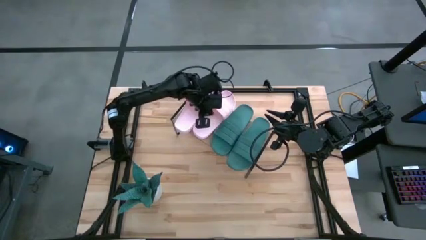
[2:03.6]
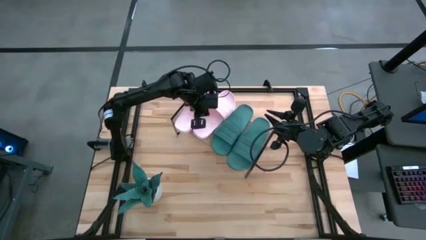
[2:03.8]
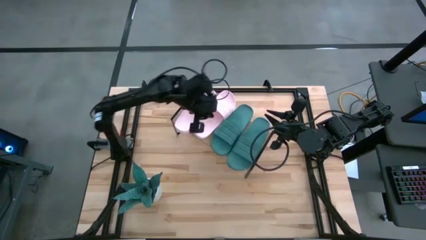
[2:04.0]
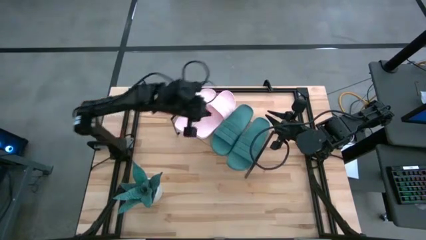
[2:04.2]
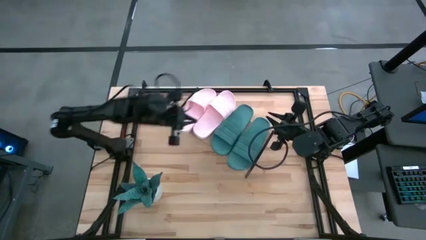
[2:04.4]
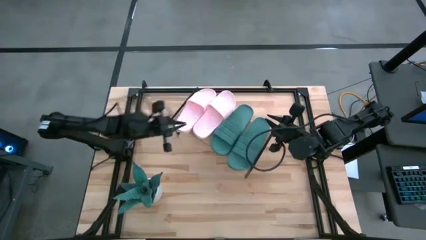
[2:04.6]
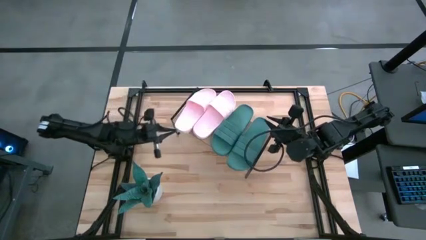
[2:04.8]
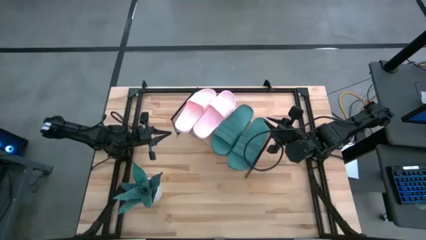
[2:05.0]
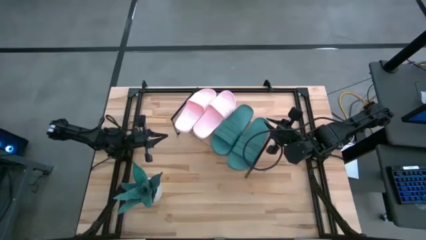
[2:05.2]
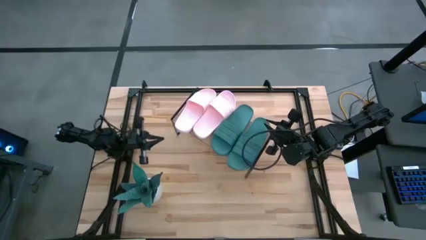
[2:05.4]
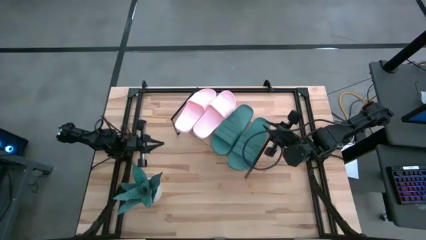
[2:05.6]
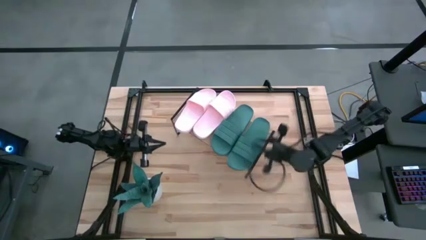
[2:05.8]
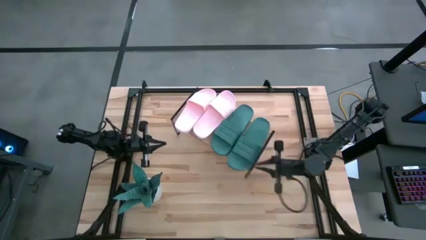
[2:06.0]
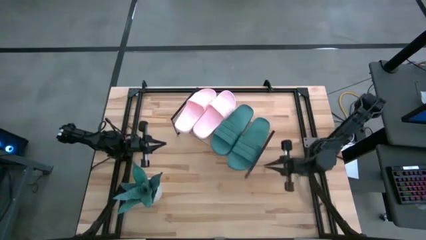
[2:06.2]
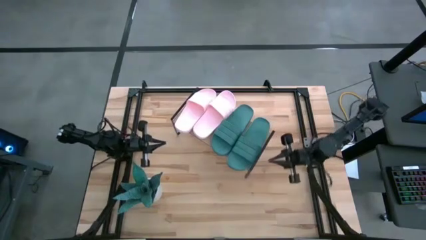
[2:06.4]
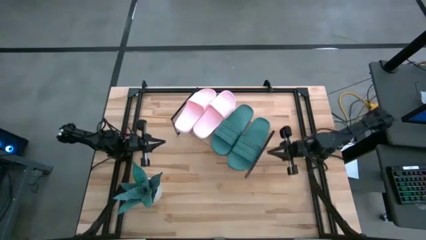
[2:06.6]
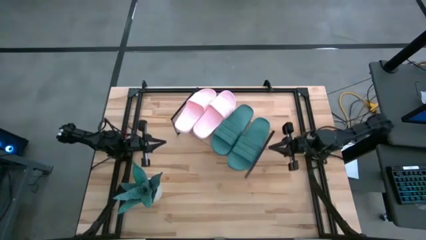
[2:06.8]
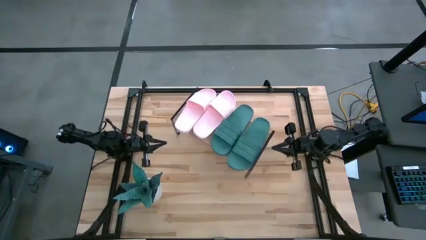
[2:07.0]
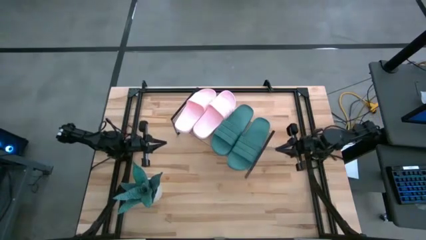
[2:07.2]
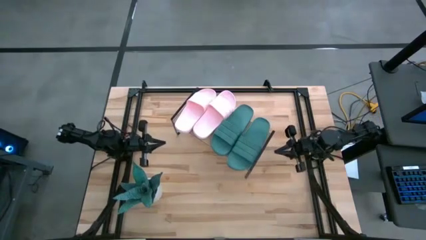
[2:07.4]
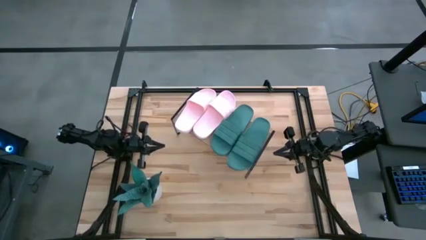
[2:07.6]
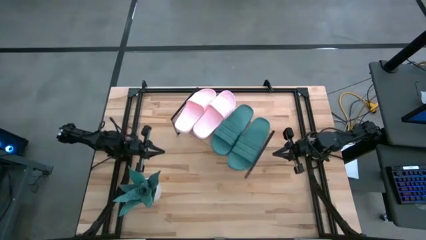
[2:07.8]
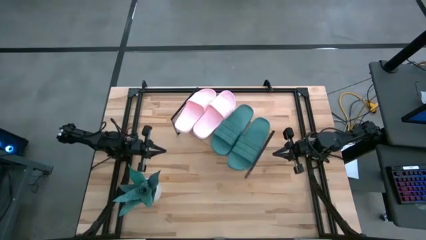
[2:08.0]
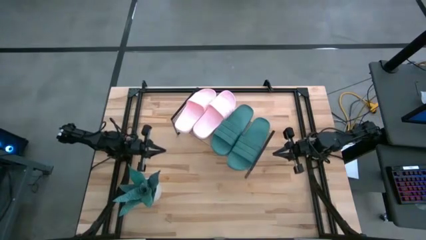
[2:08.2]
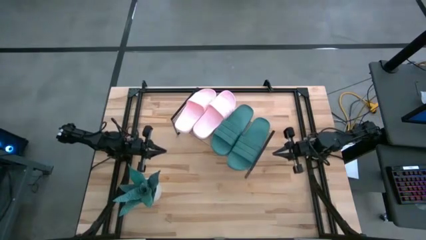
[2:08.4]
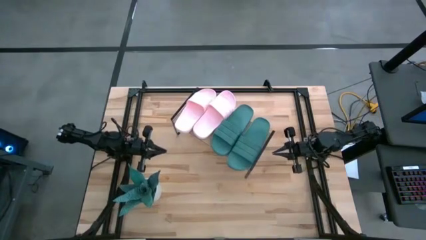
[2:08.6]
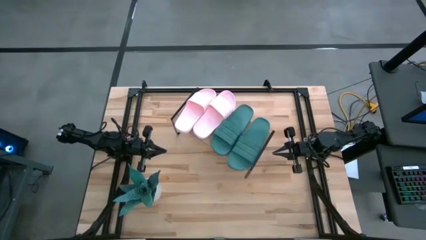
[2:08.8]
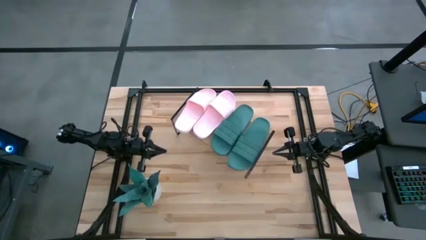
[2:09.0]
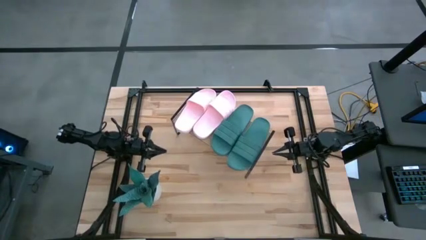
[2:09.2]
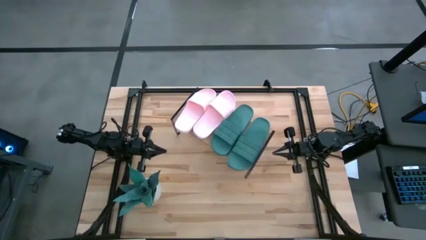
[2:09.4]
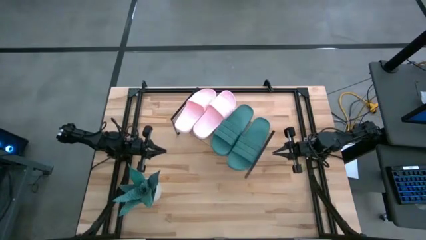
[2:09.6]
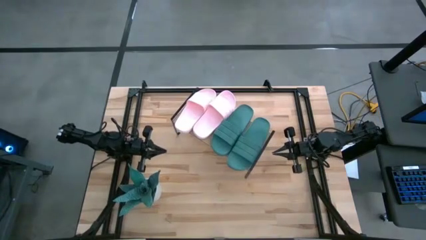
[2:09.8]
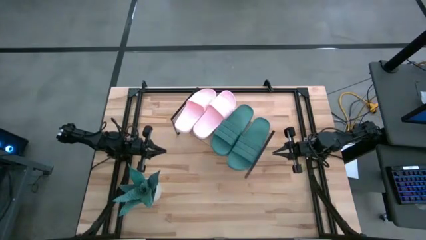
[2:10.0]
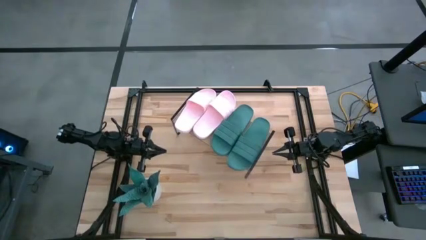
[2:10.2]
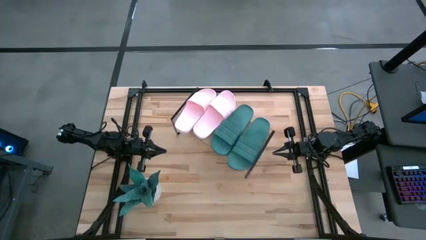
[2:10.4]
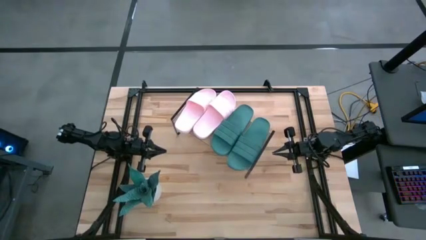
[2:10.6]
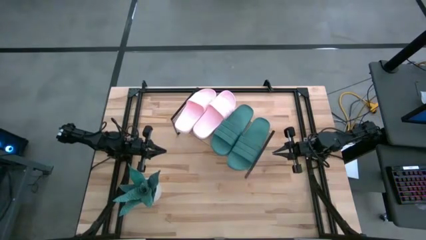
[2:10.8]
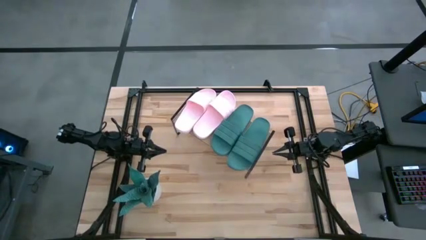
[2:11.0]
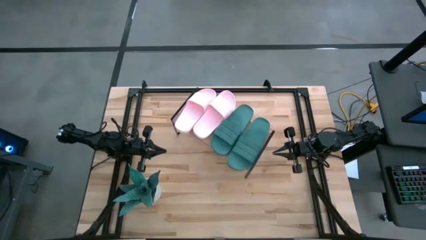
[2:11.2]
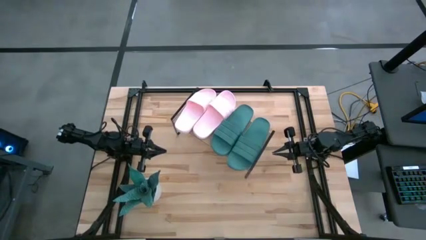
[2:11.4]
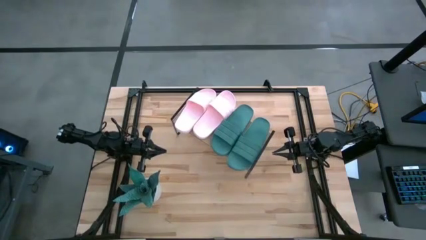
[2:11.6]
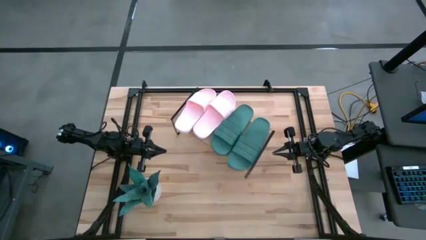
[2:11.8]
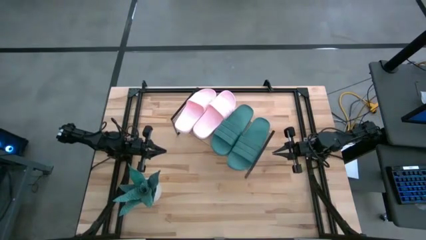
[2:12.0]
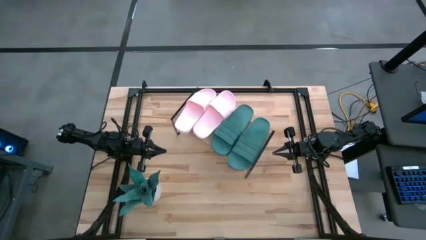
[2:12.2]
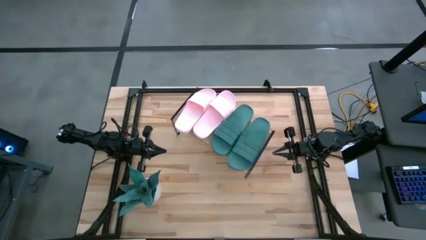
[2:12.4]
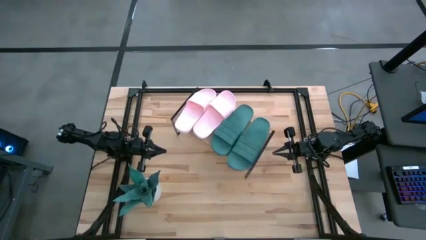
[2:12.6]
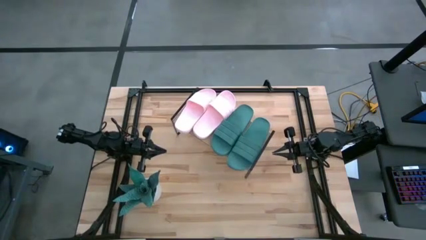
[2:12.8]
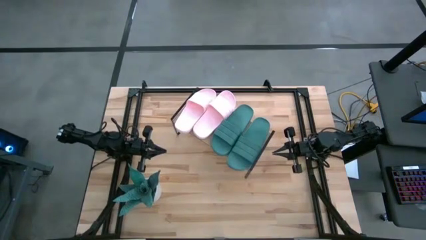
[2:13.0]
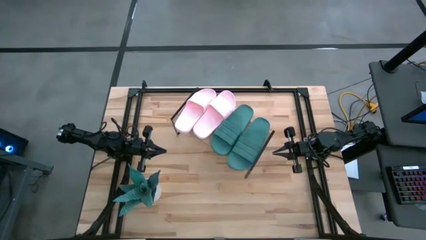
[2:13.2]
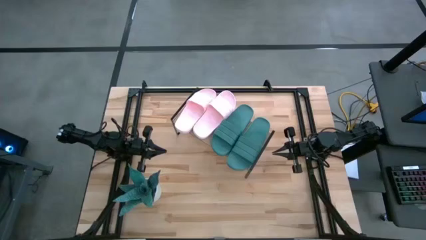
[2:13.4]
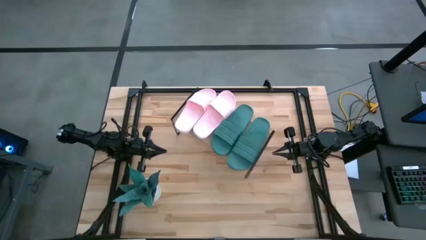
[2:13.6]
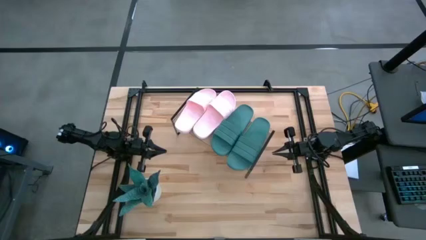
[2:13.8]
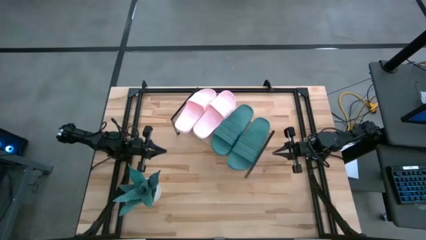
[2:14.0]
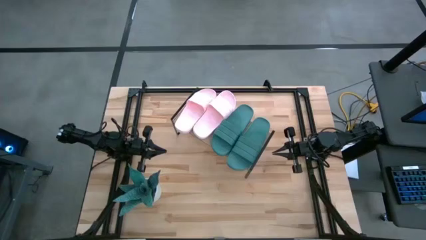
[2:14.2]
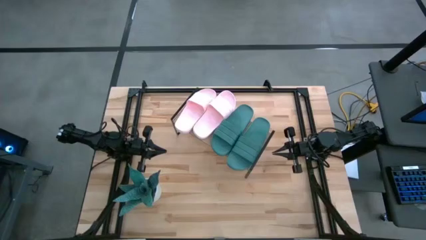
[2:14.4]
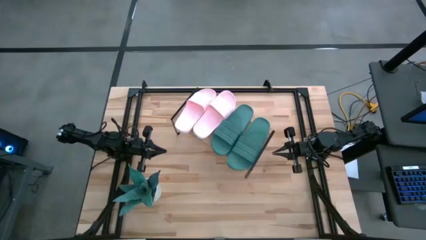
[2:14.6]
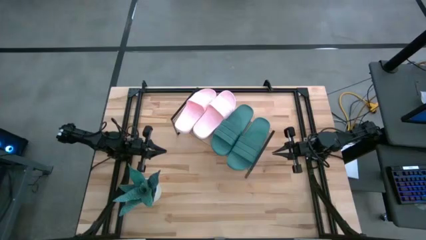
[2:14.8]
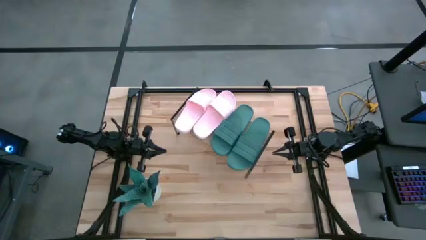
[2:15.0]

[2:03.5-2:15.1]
Task: Pick and place slides into the shelf
Return to Home Position

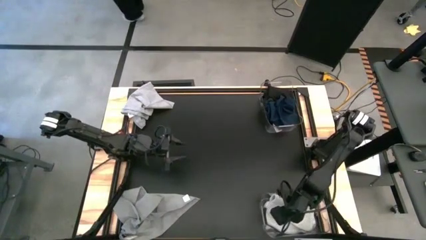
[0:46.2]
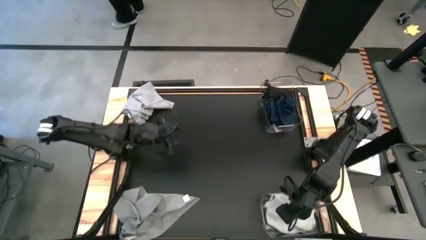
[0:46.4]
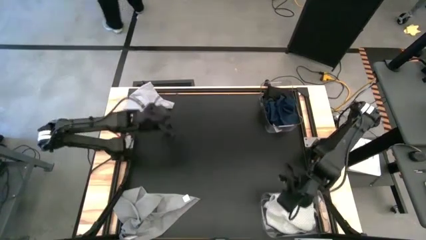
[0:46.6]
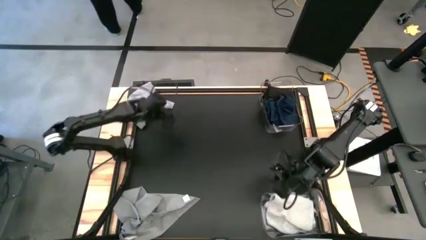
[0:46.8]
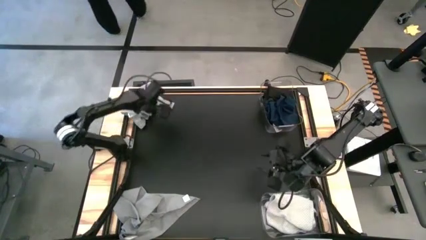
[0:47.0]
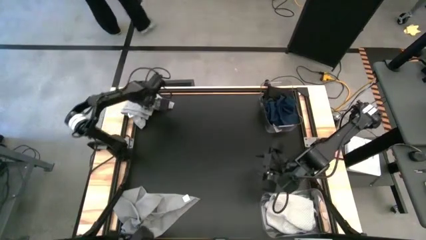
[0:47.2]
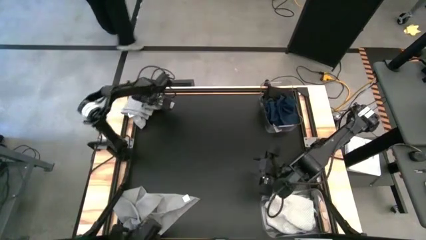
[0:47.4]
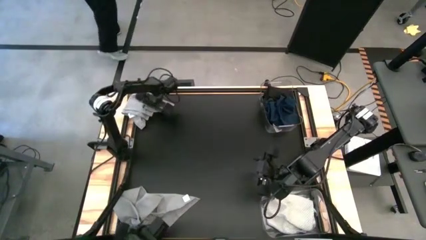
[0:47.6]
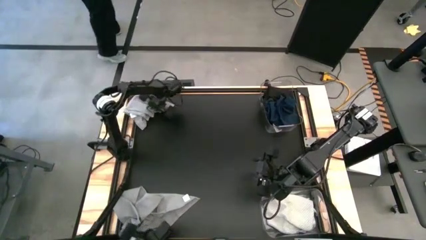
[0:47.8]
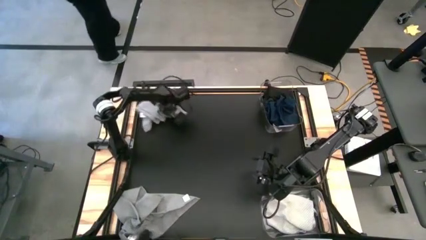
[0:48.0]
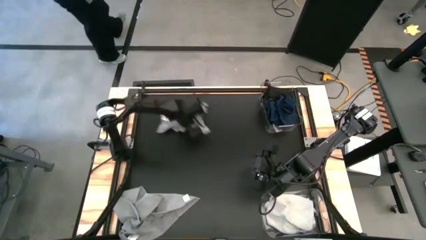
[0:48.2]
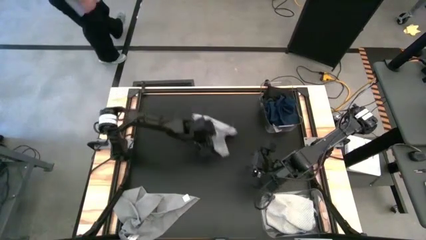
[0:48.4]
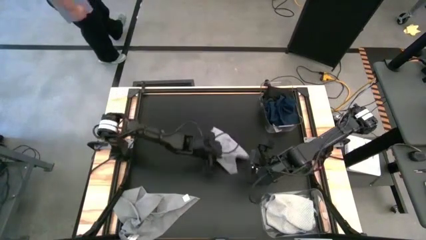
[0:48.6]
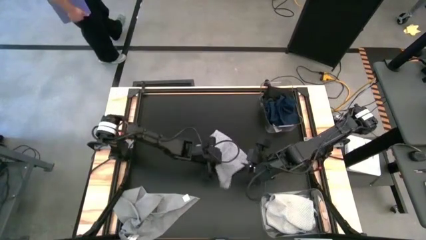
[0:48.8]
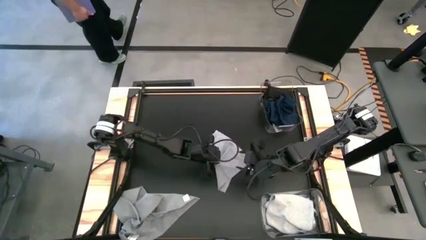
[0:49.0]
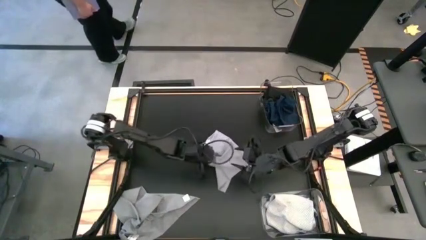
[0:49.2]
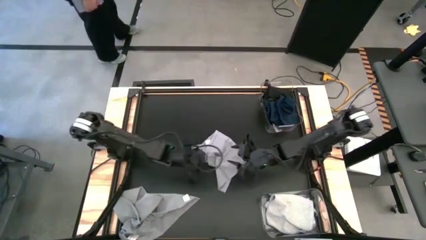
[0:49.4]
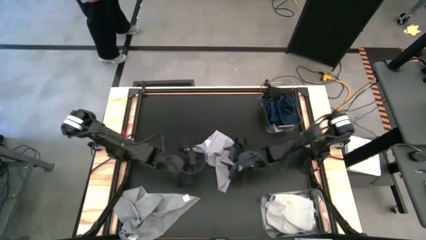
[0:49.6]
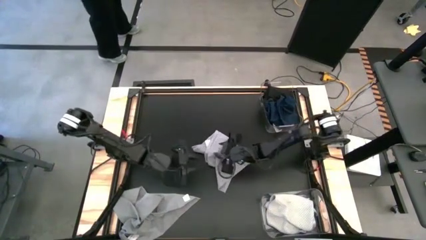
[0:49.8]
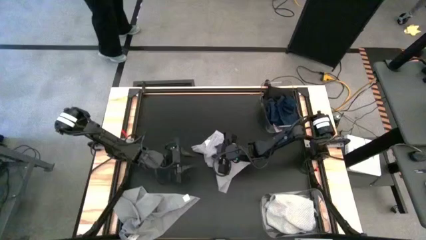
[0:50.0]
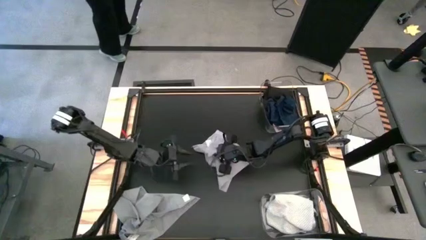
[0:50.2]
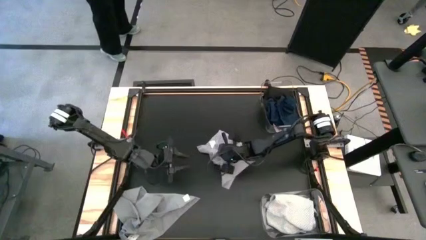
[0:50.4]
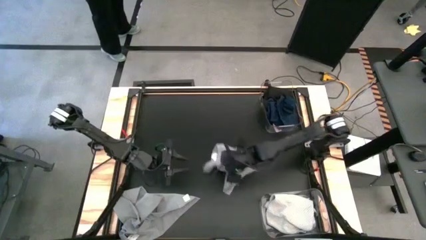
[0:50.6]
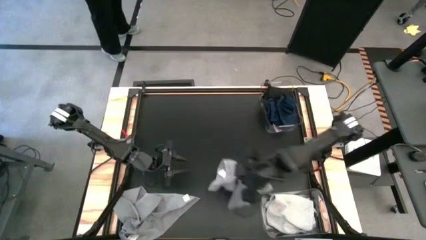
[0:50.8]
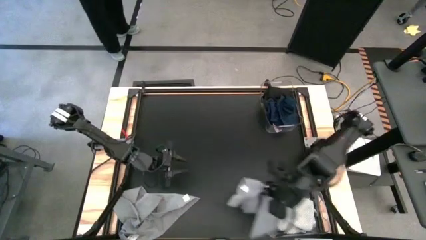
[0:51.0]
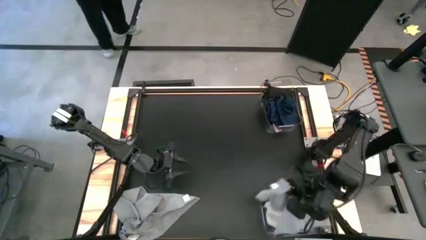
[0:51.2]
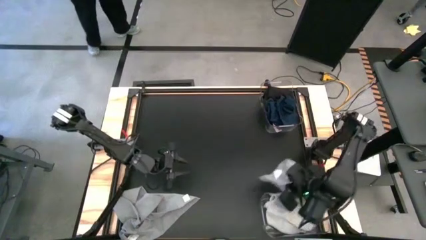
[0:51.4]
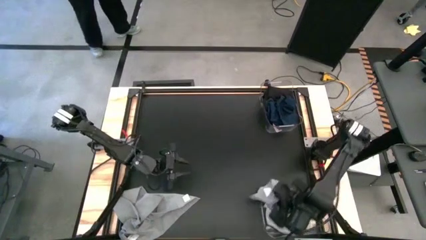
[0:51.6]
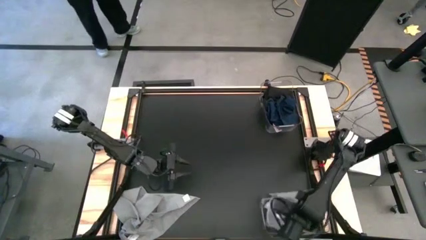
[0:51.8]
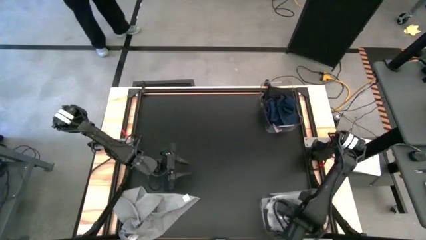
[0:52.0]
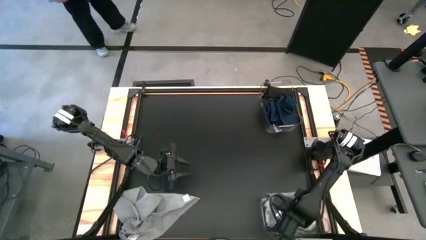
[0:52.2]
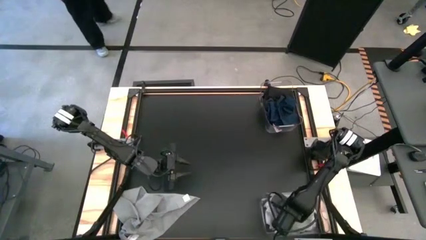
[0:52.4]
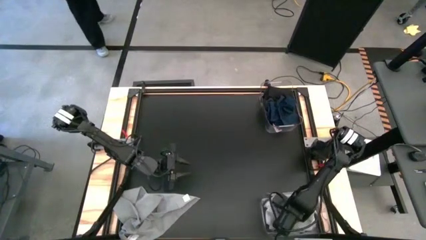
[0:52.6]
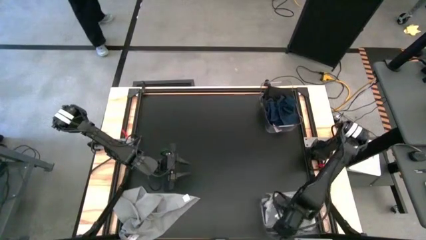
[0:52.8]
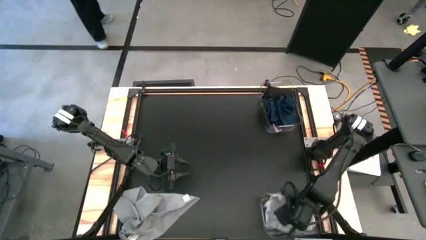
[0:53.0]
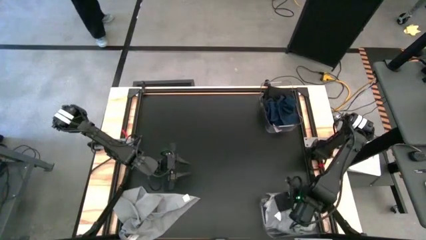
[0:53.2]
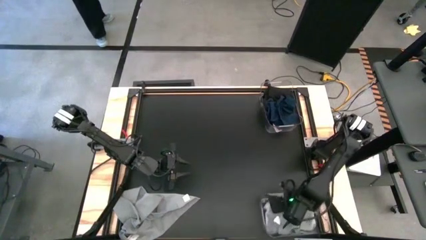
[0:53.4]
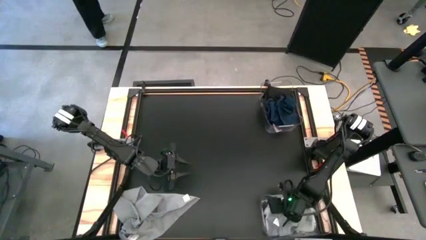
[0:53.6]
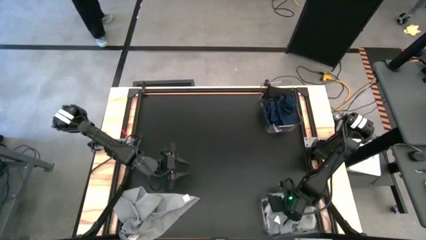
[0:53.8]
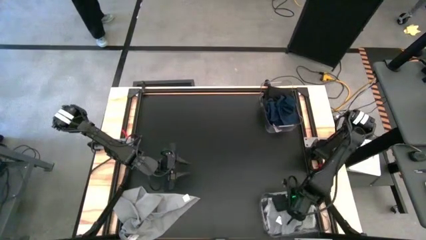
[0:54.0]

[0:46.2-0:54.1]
Task: Sort towels by color in basket
Put the top gray towel into the bottom transparent bin
